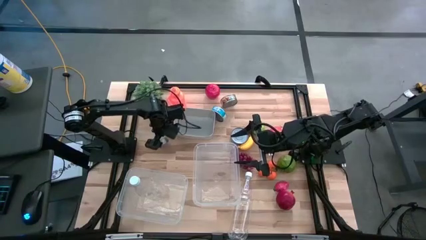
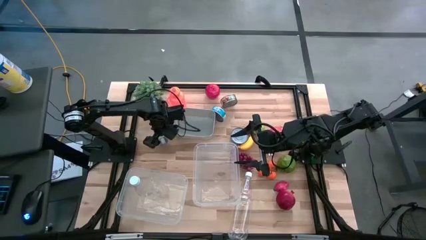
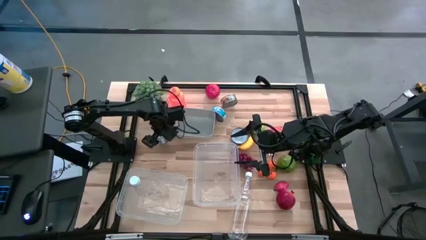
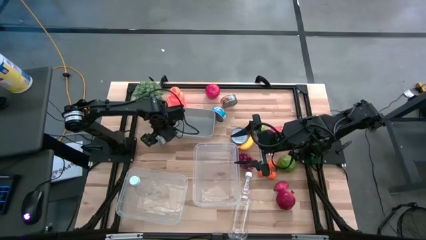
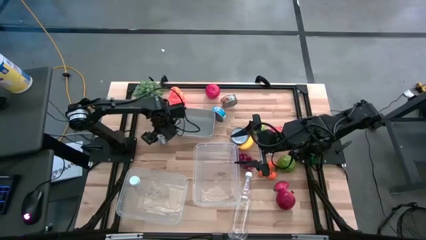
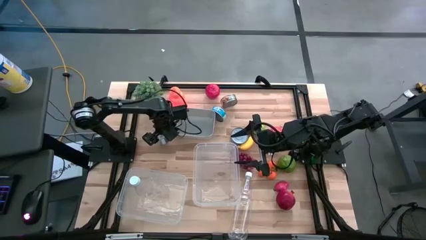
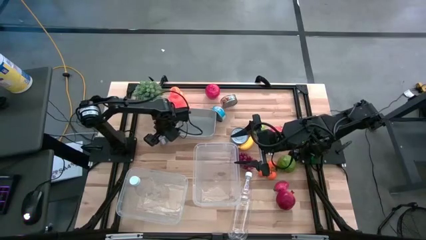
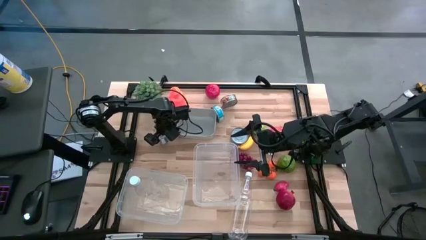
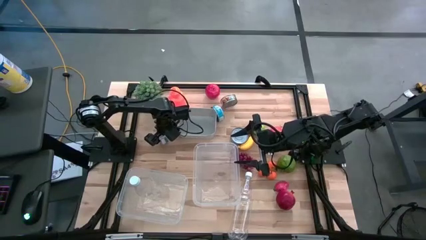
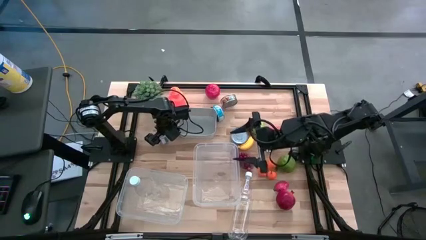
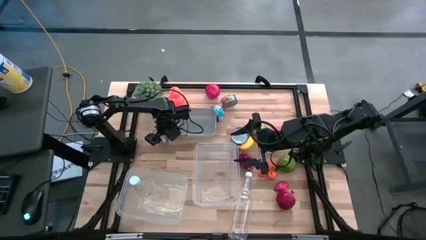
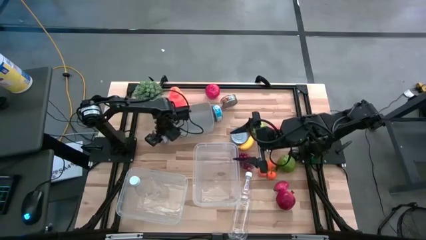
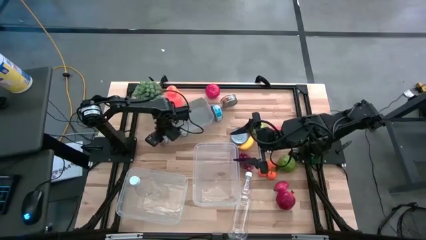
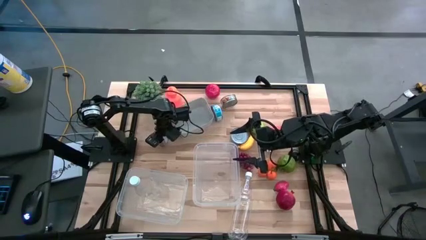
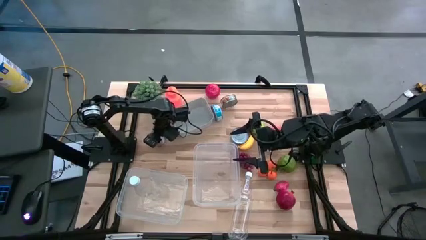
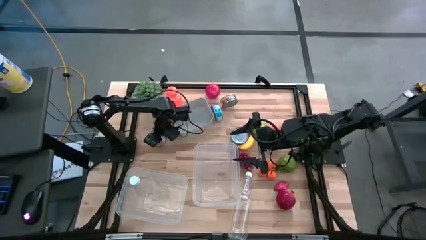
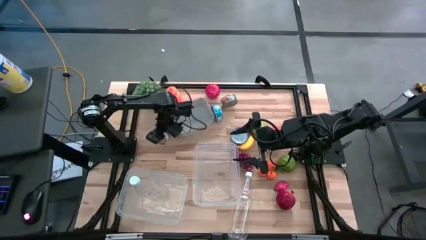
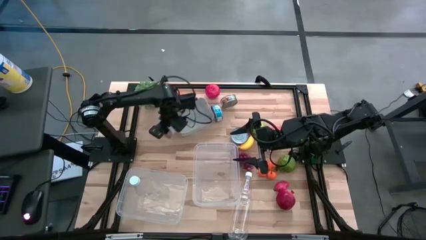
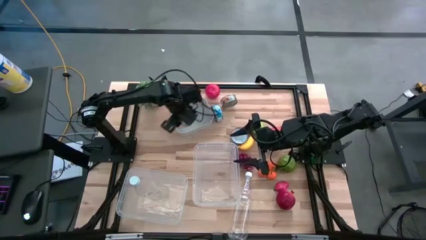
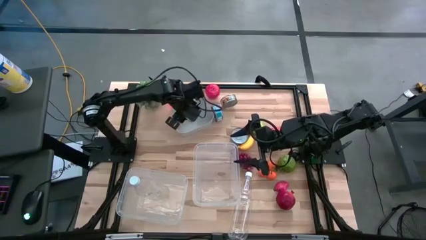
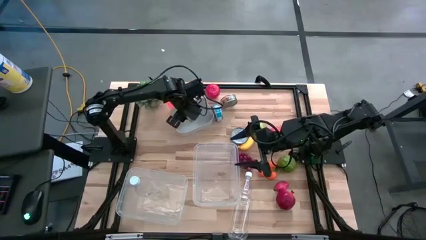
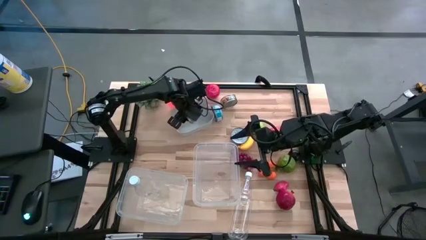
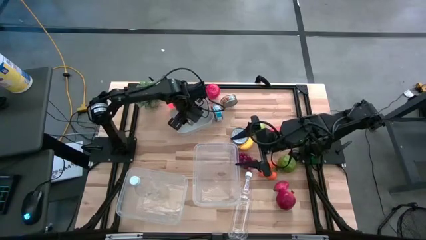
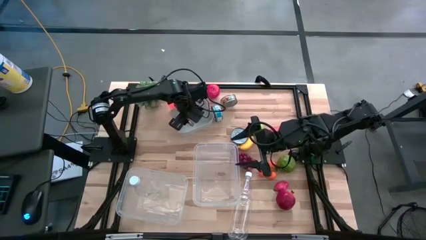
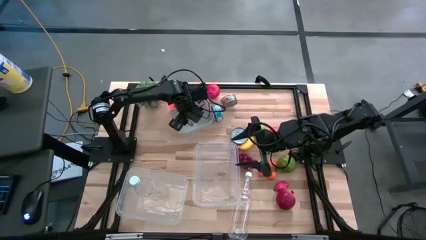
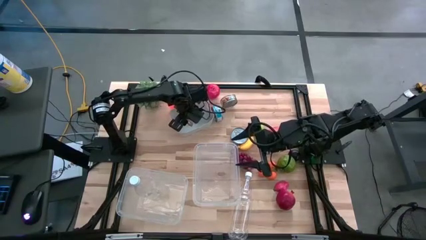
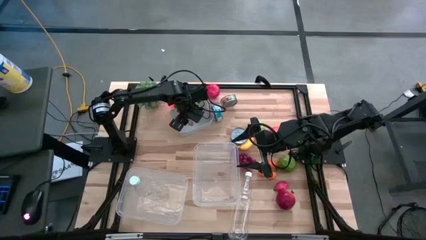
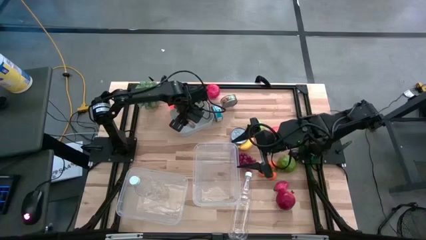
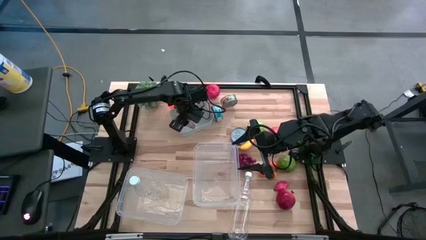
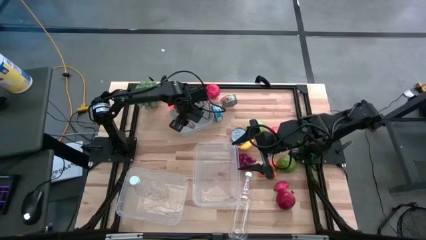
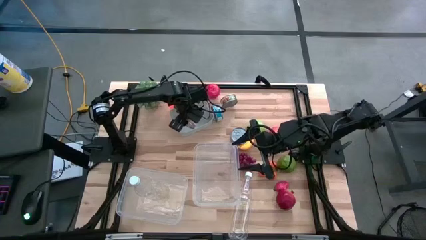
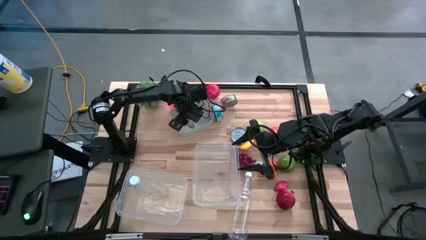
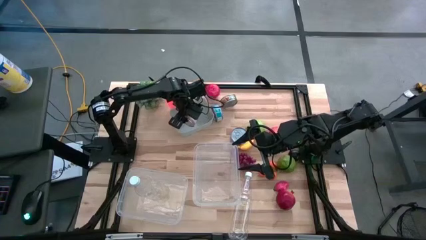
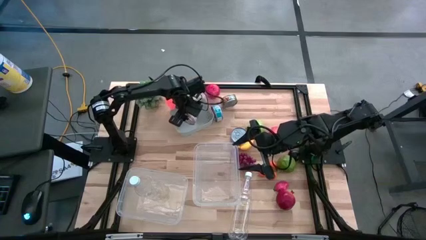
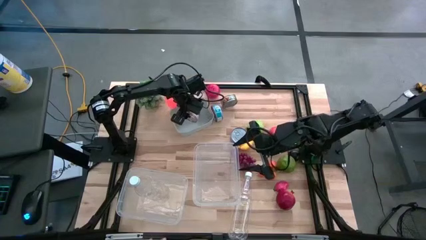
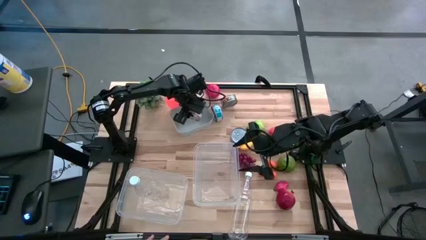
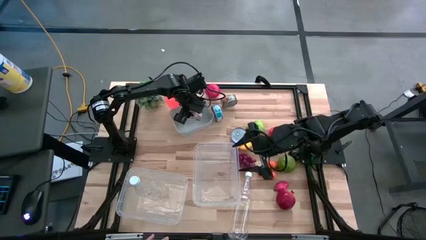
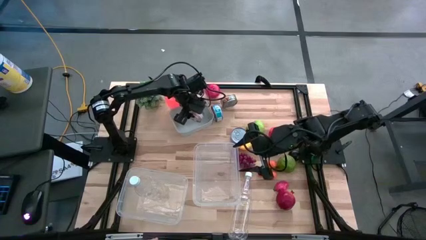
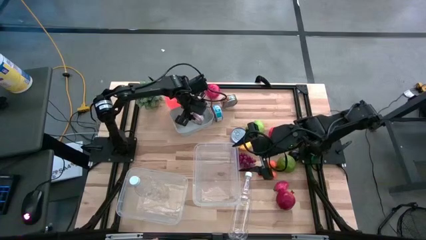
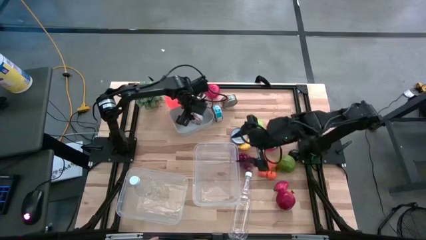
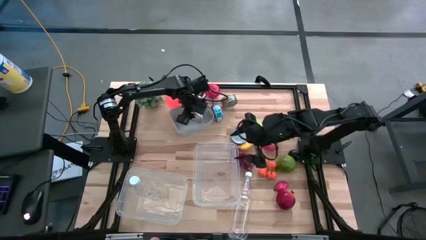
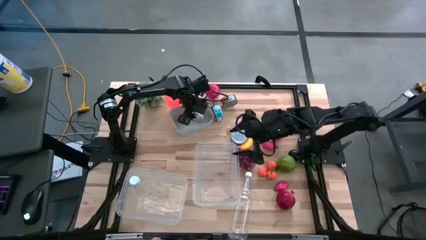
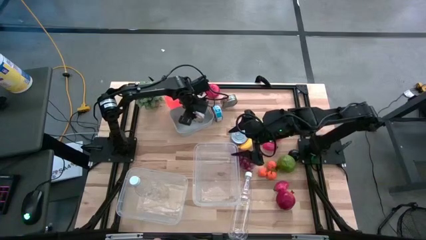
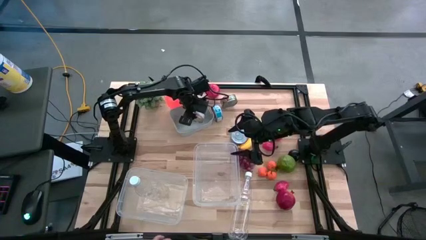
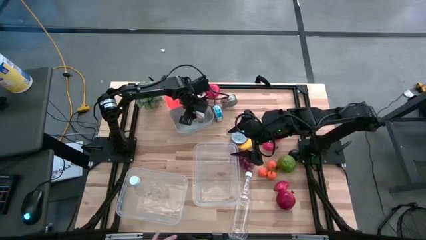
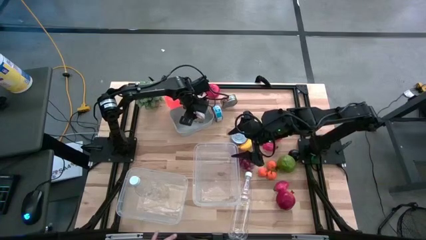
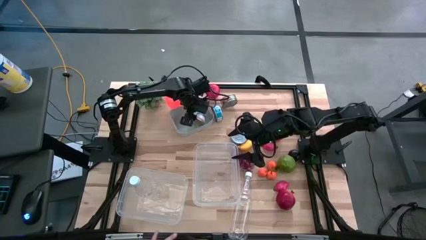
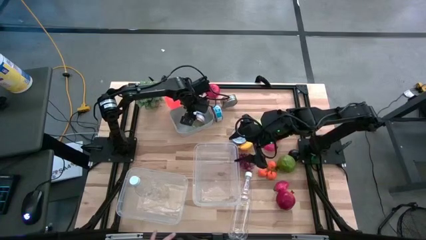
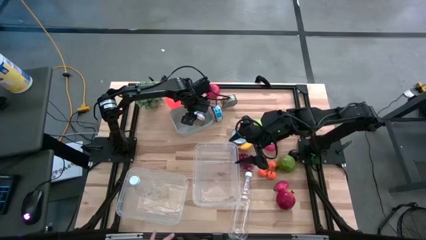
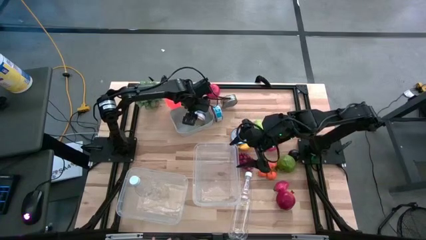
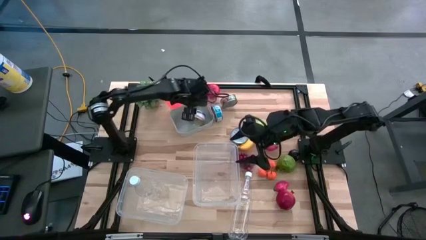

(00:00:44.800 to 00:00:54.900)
Task: Pick & Place Food Item
Put the pink tuna can into the gray bin

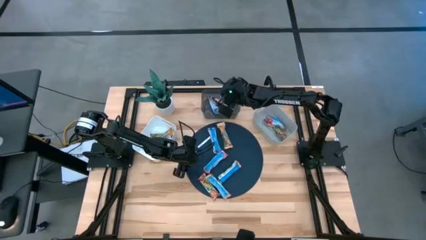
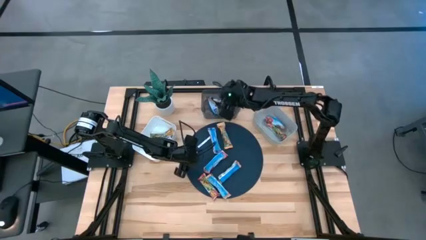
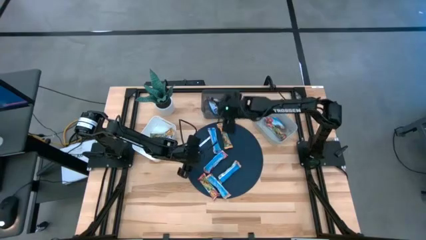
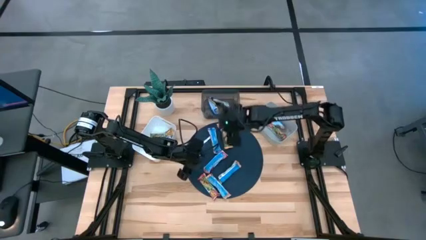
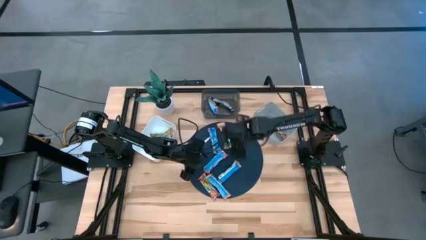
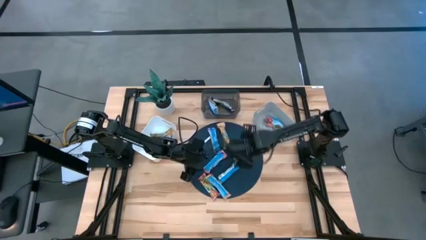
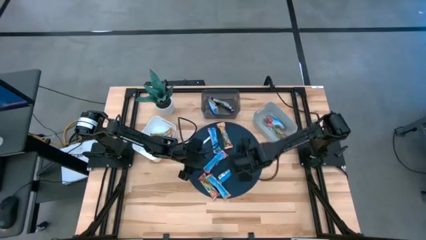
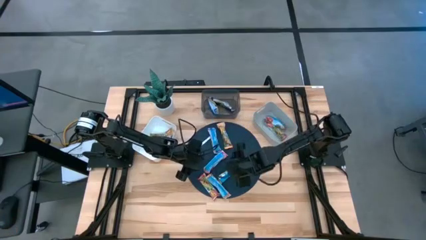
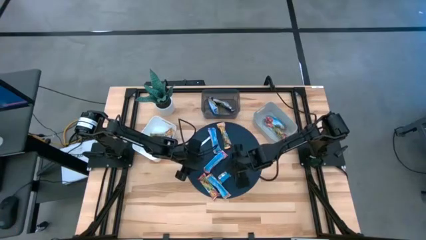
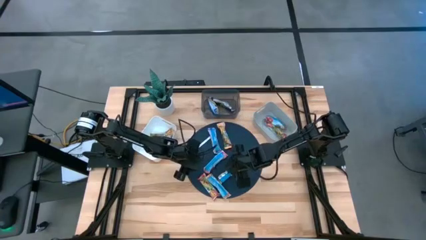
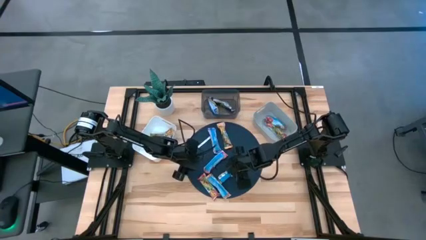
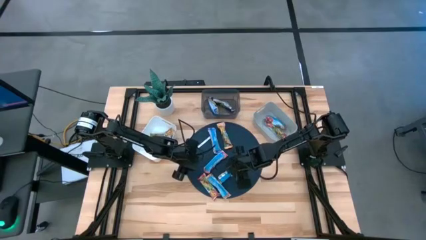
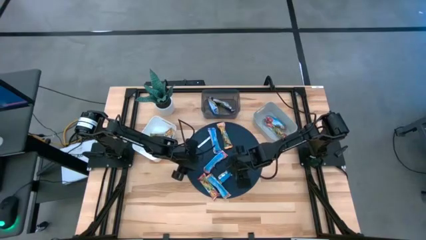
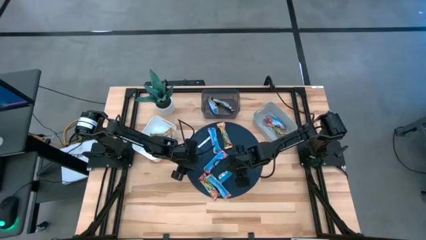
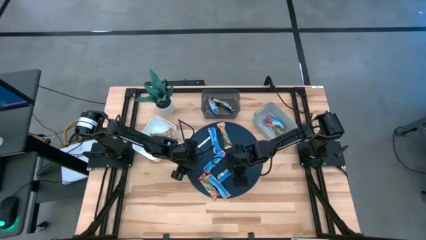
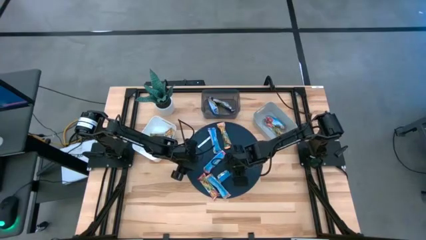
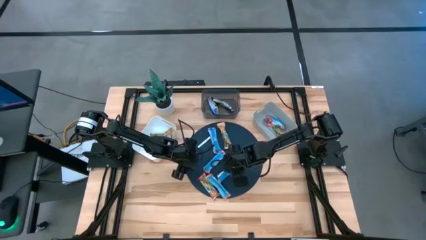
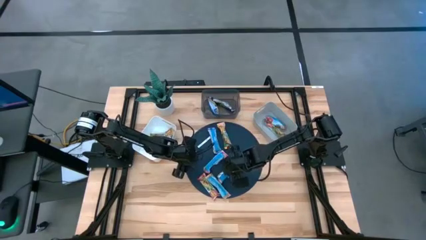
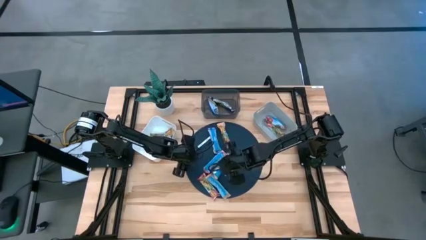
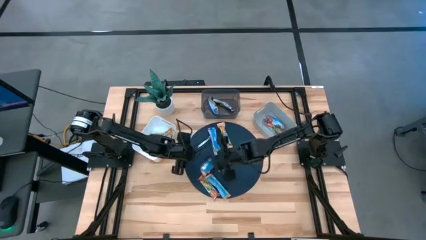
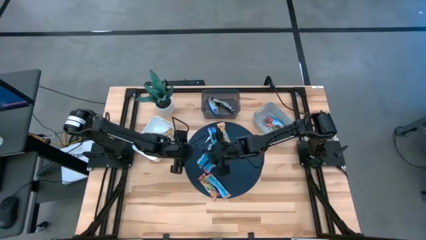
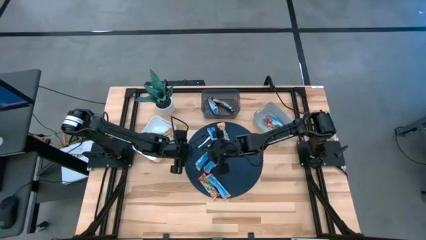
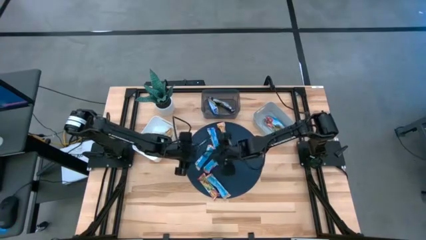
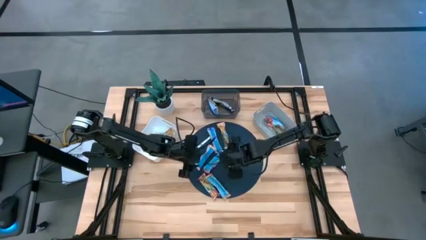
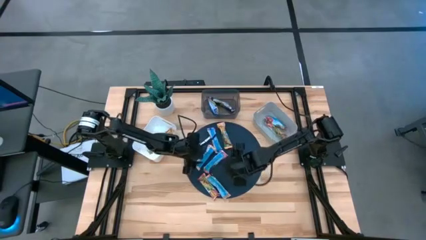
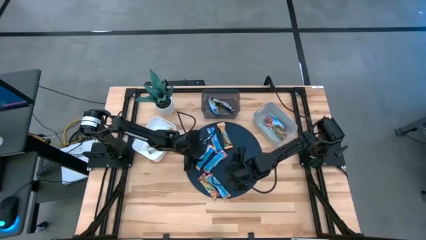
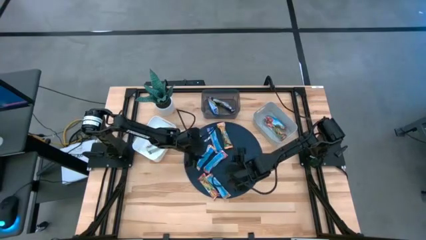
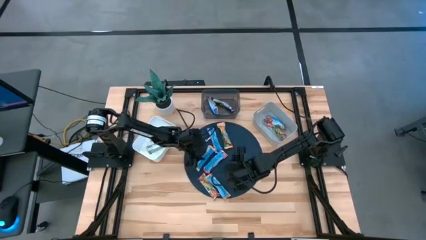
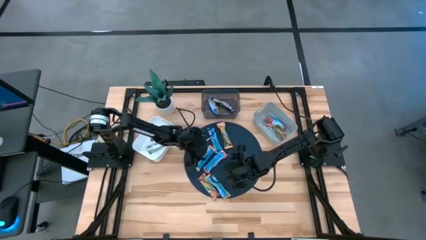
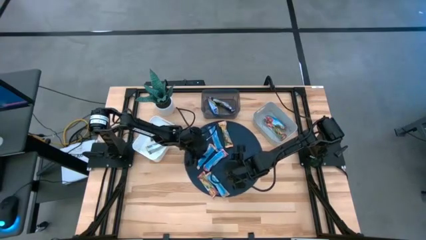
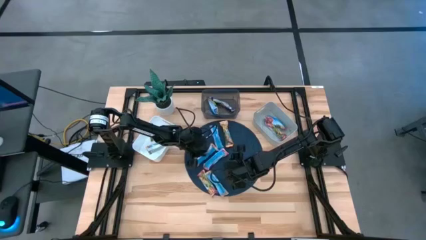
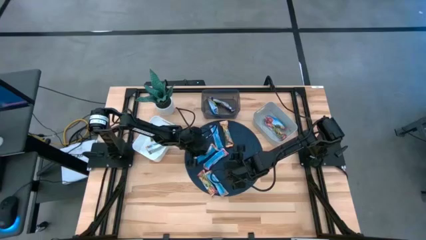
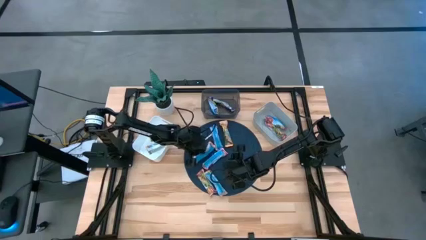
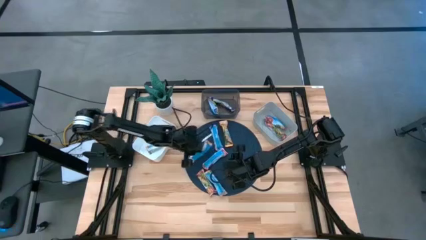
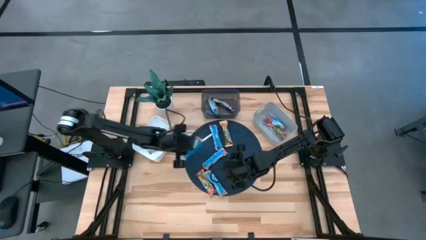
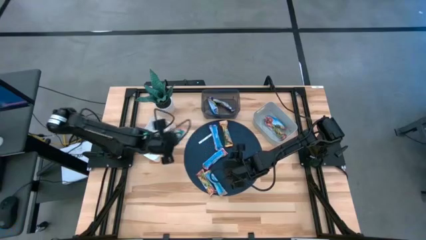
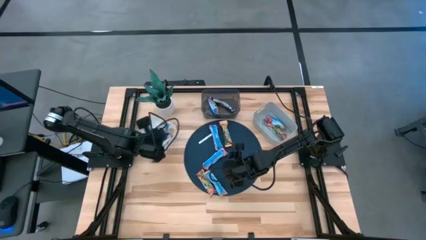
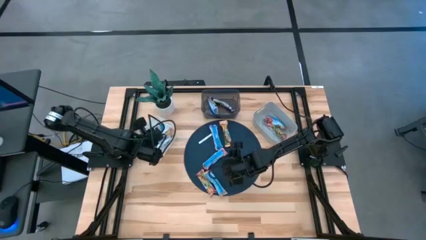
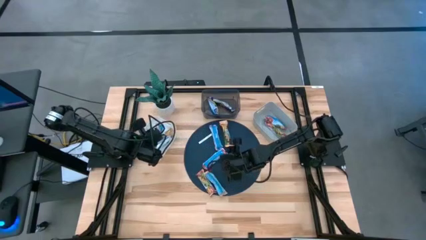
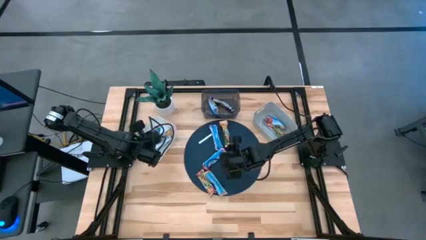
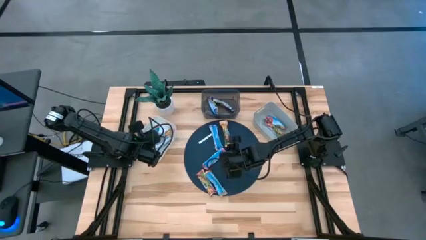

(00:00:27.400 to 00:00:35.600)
Task: Pick and place Granola Bars by type
Put the yellow granola bar into the white bin
